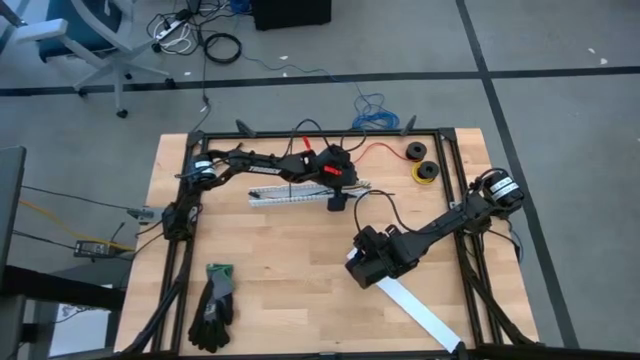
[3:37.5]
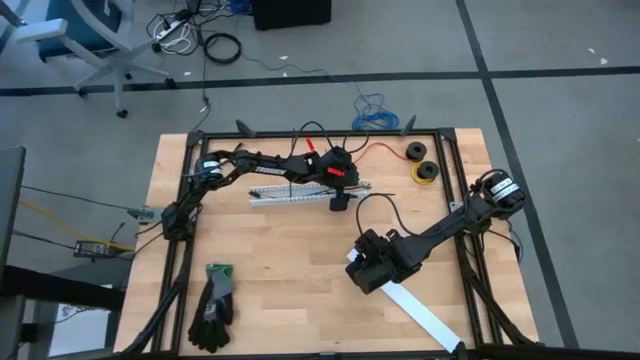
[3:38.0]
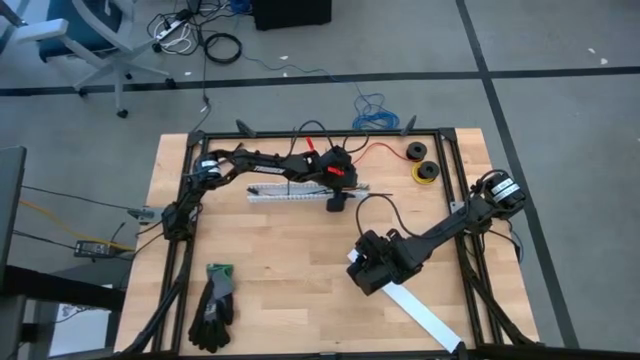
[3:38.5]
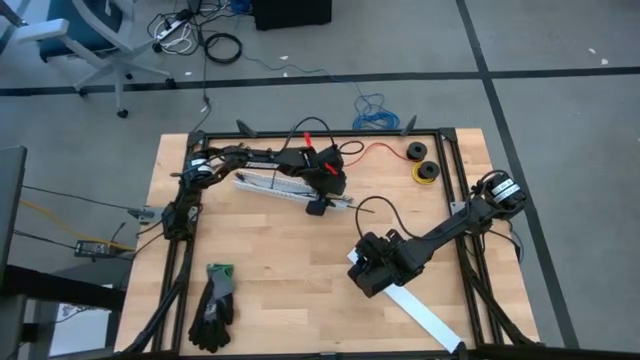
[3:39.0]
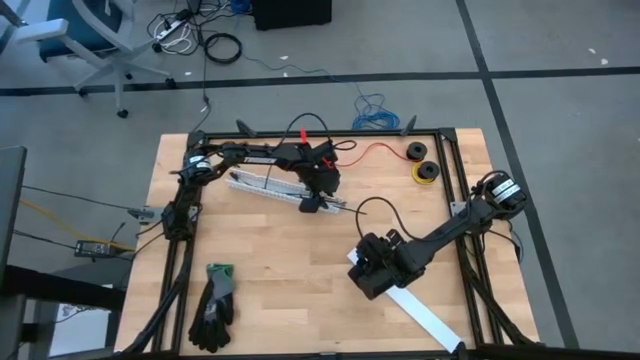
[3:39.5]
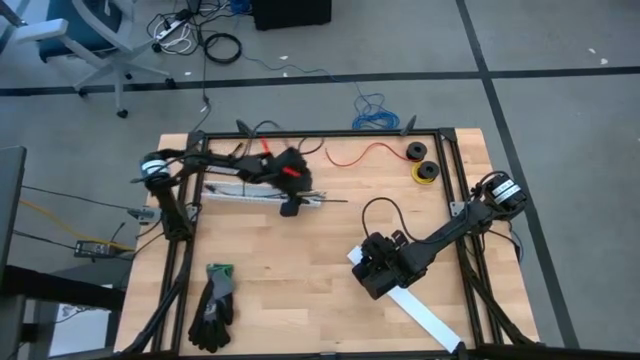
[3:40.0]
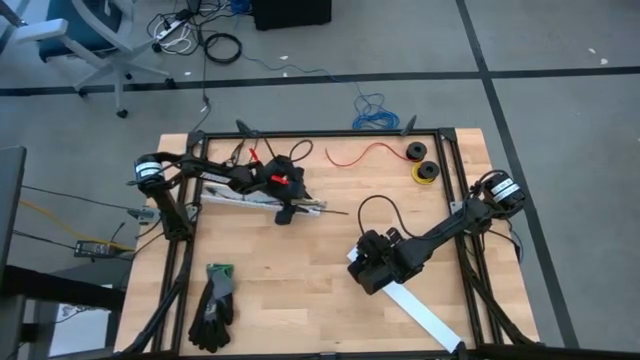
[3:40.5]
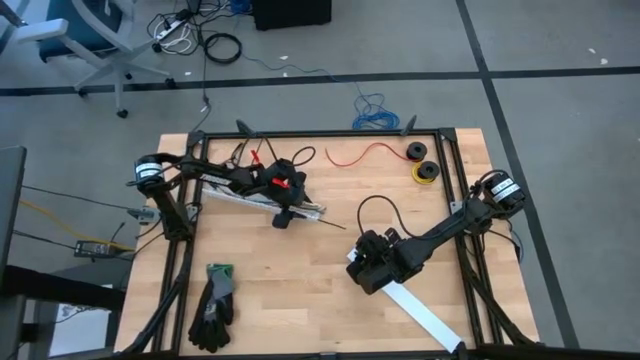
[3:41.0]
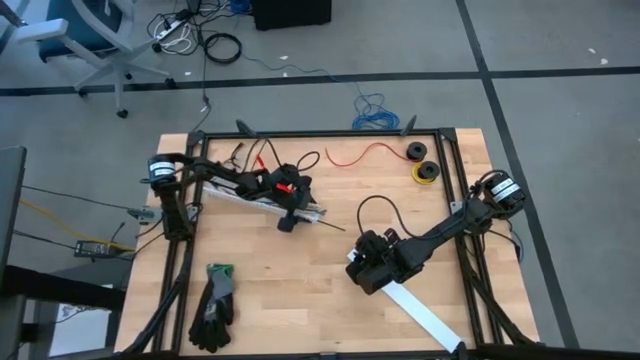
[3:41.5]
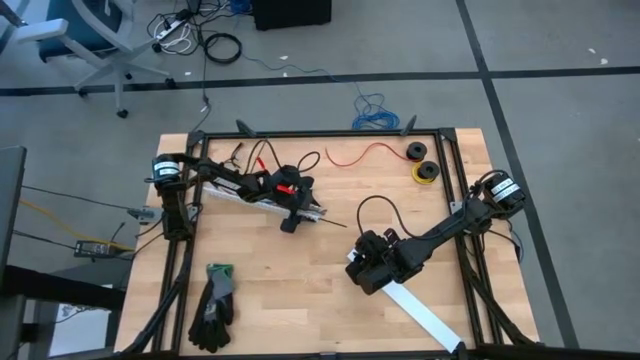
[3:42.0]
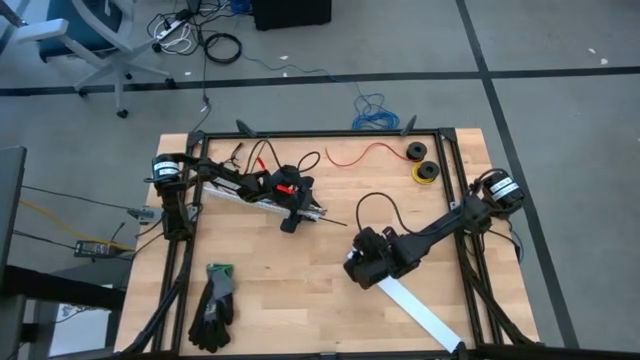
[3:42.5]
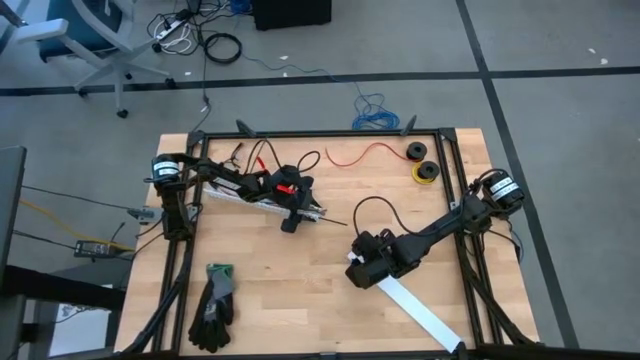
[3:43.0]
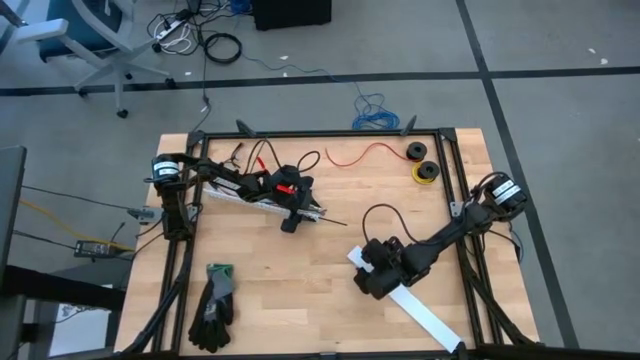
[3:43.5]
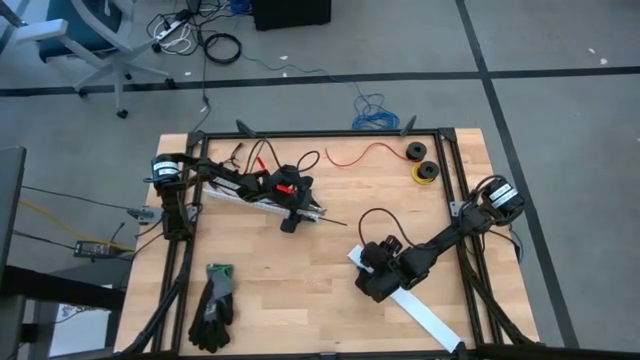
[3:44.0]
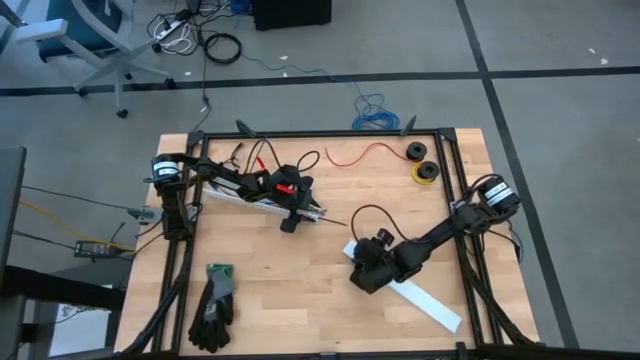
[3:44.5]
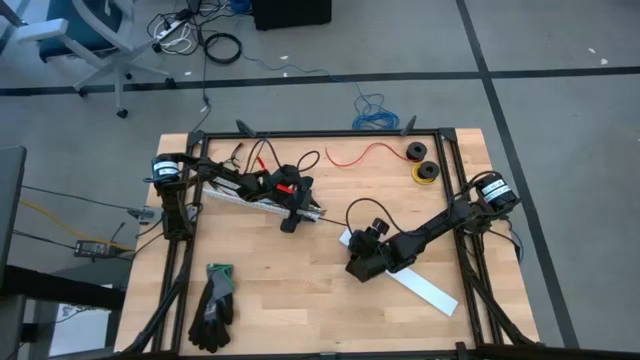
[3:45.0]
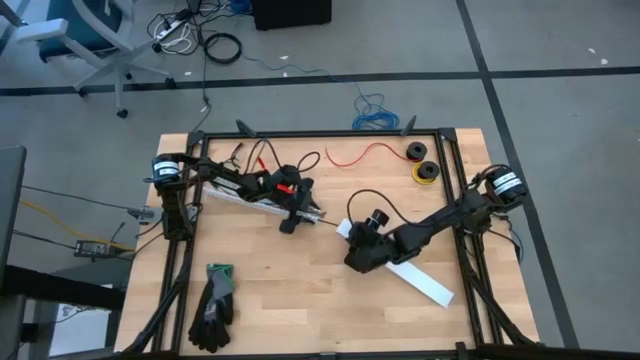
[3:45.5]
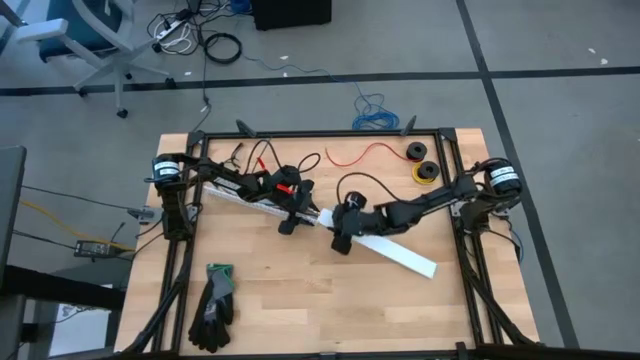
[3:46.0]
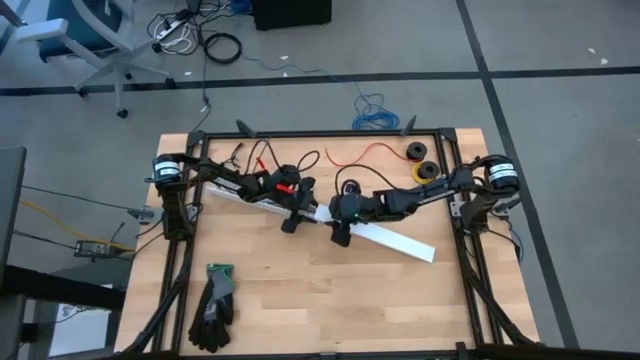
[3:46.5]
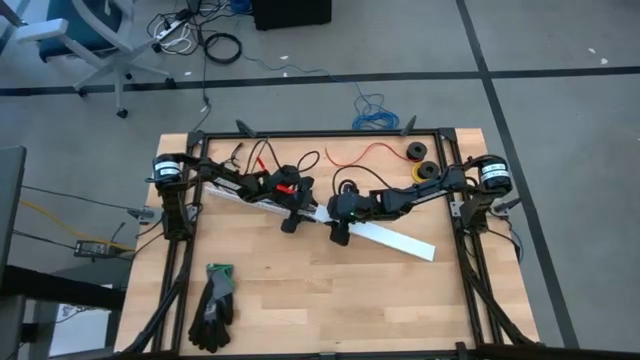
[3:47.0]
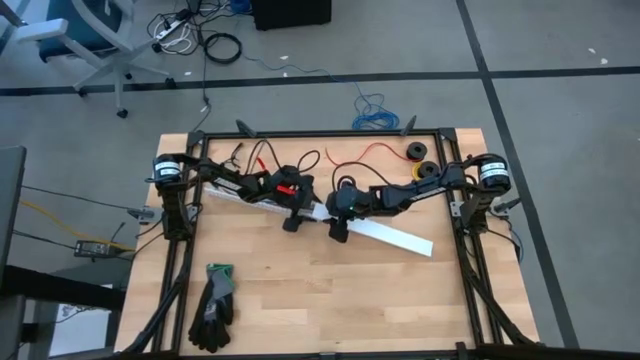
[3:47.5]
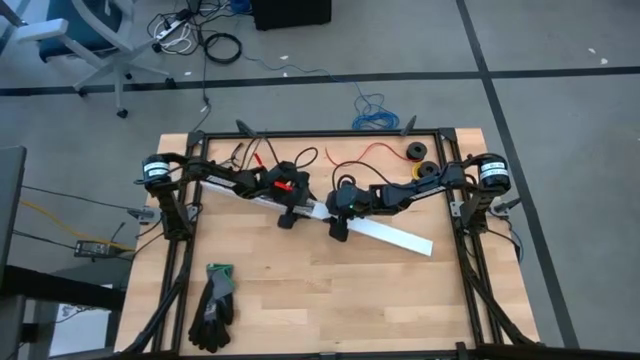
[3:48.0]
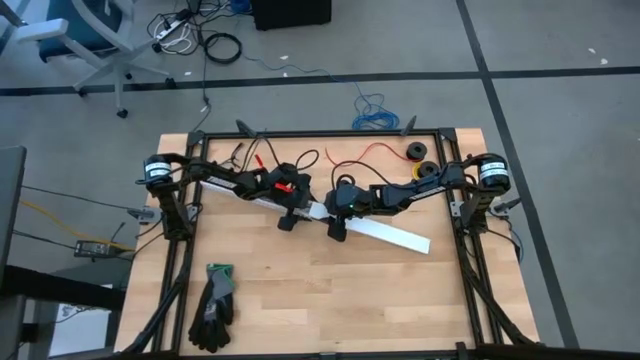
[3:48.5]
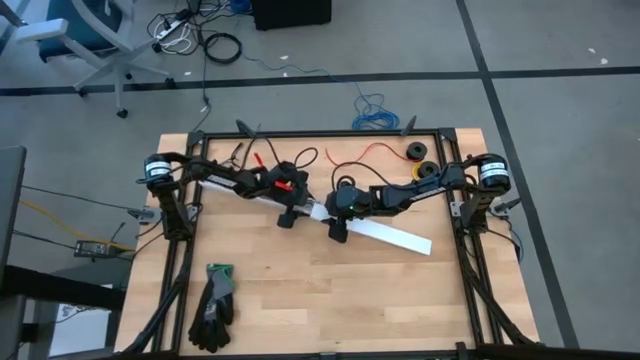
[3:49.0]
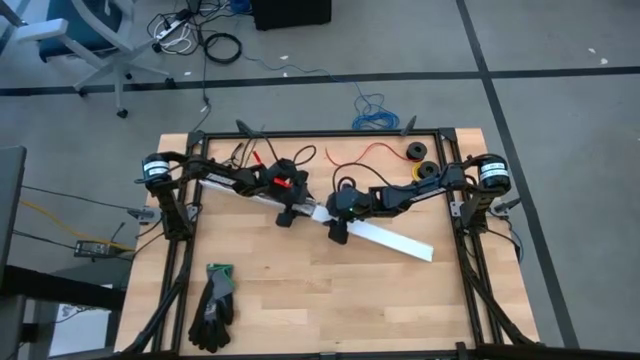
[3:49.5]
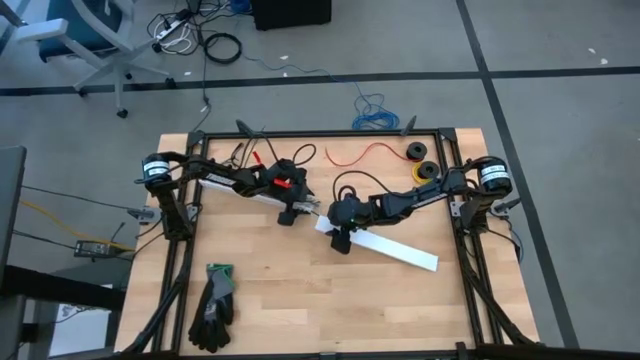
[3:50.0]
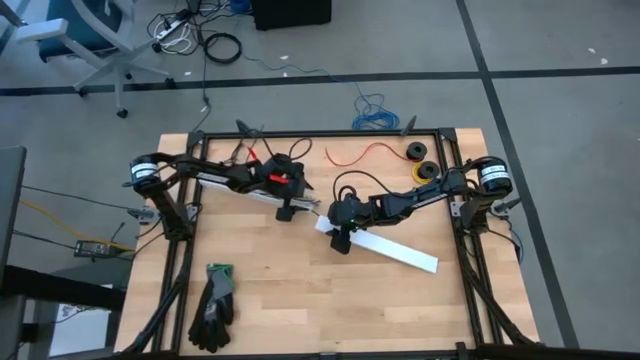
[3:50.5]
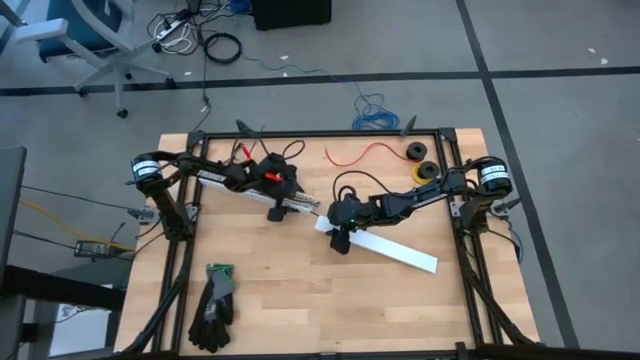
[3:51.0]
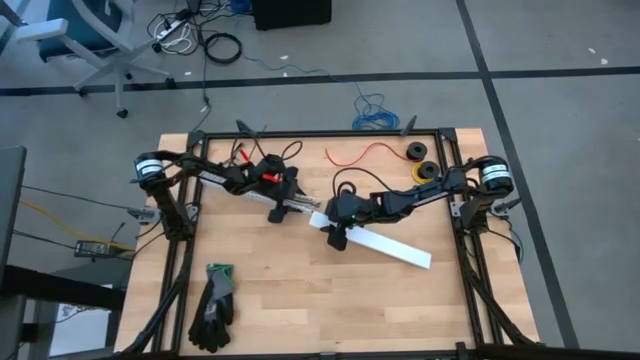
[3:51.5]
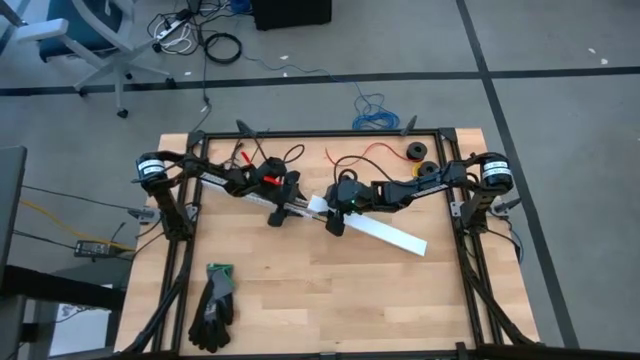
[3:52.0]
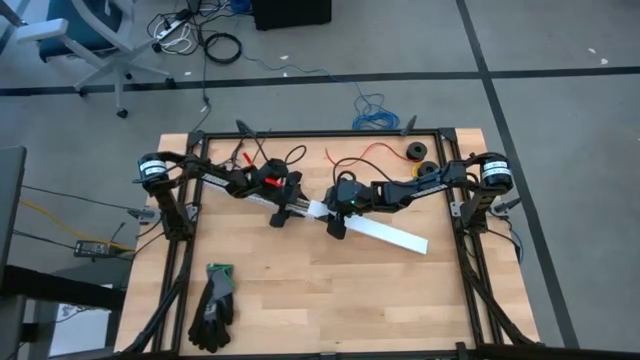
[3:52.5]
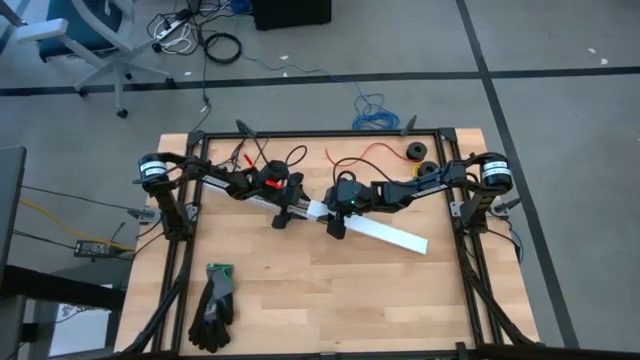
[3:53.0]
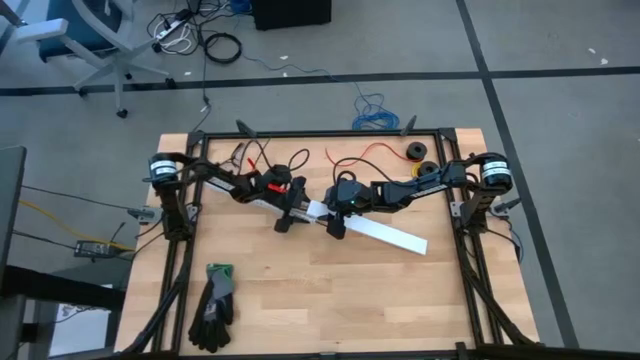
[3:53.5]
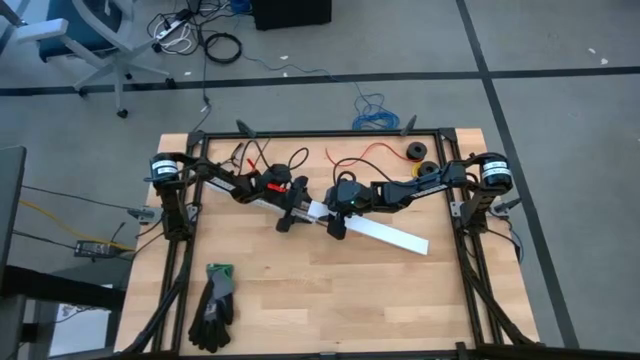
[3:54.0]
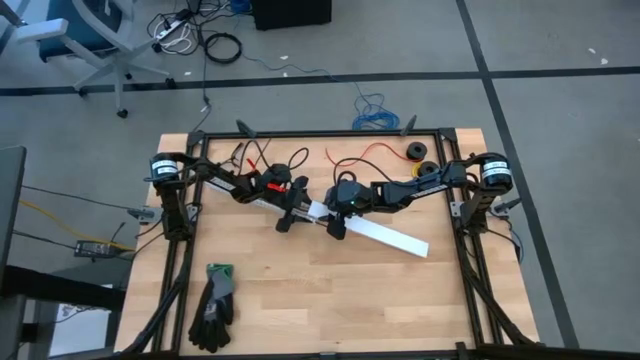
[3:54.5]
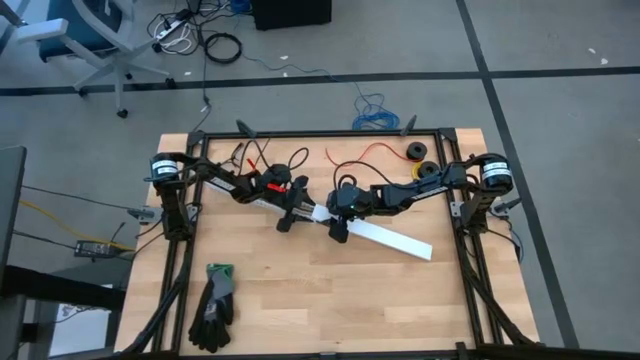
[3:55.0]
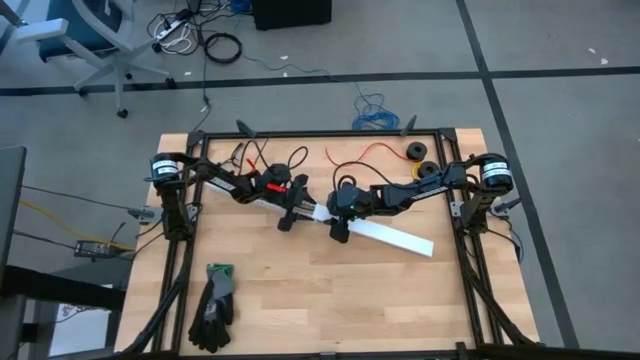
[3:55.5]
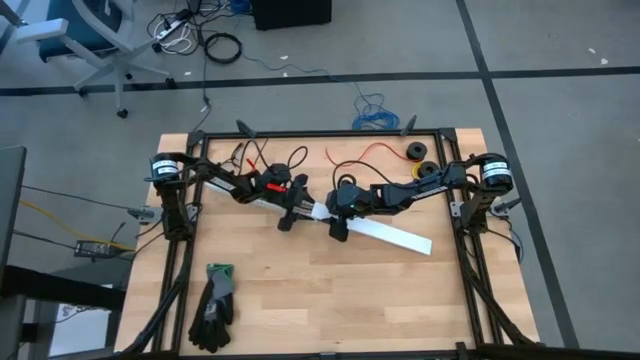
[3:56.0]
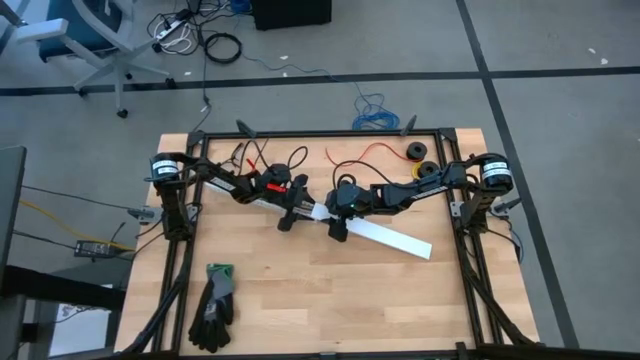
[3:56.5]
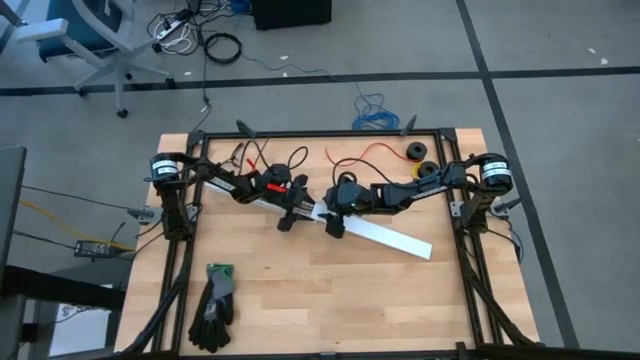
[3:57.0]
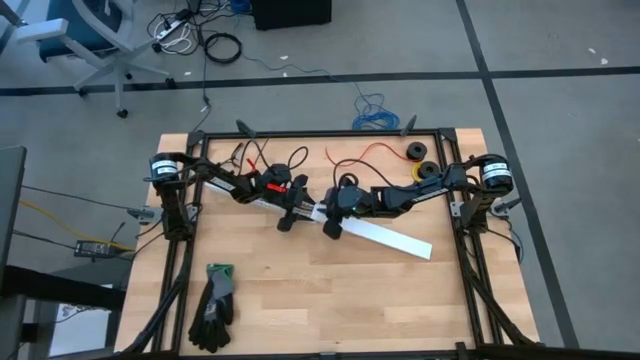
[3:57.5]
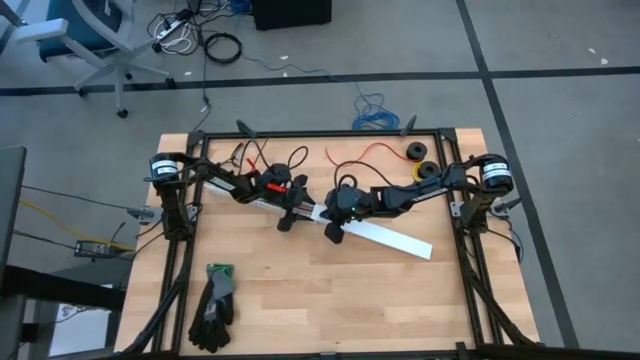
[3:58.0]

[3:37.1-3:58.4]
Task: Ziptie cables
Close the cable duct with the cable duct lid

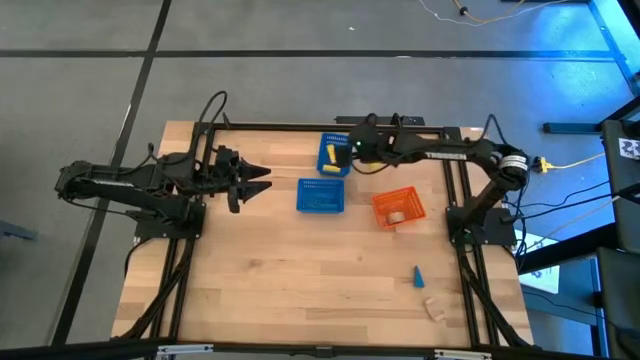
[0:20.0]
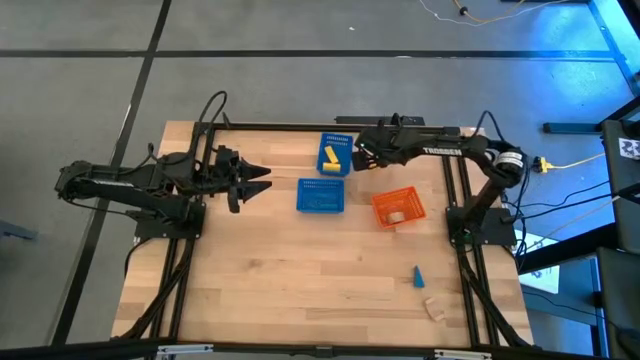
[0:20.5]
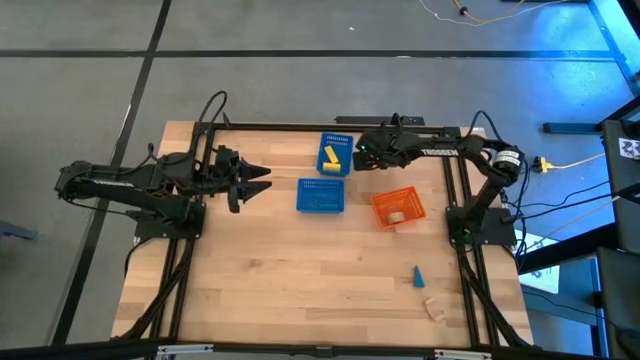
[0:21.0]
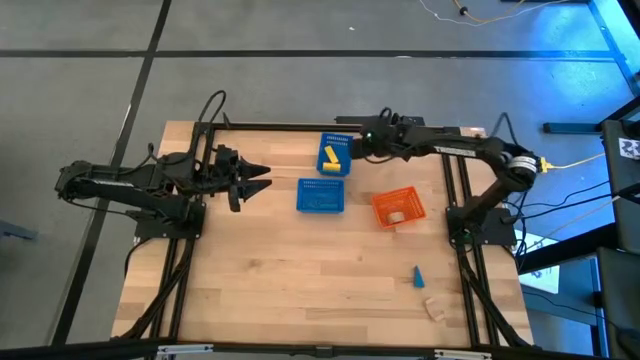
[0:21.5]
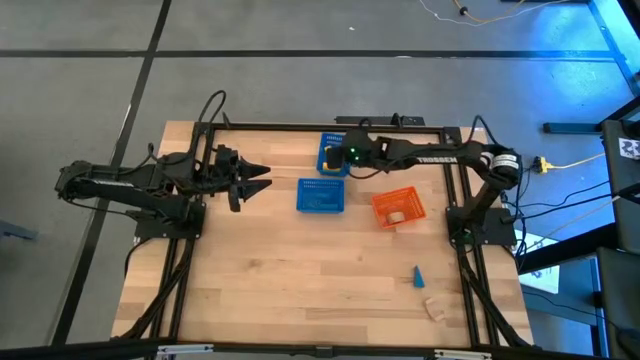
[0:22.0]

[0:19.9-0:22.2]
Task: Sort & place blocks by color
Put the yellow block into the top blue basket

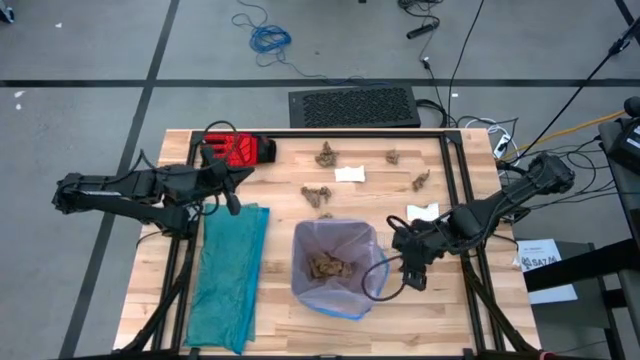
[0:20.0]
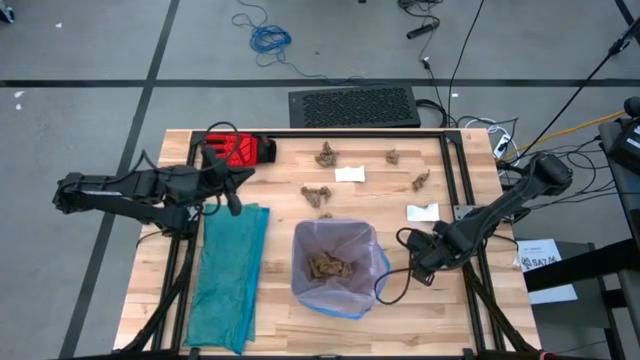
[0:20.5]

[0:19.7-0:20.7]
Task: place trash/remove bag and relplace
Put the brown napkin into the black trash bin
